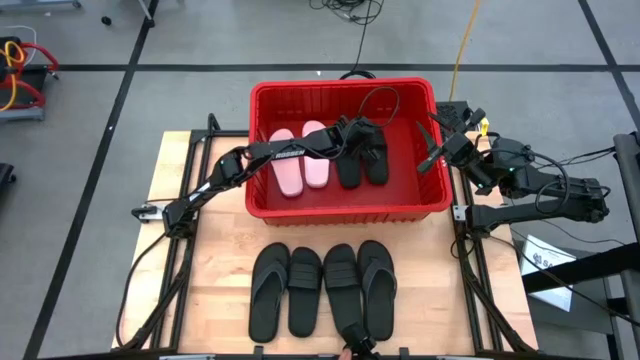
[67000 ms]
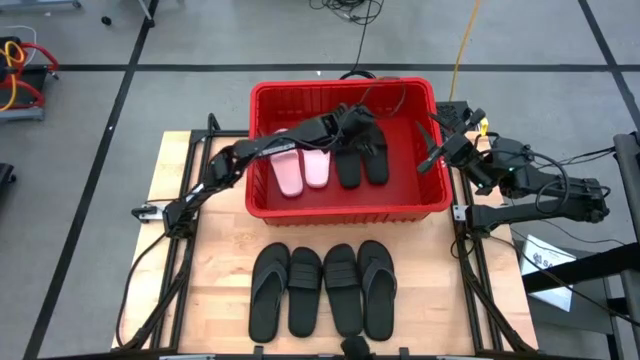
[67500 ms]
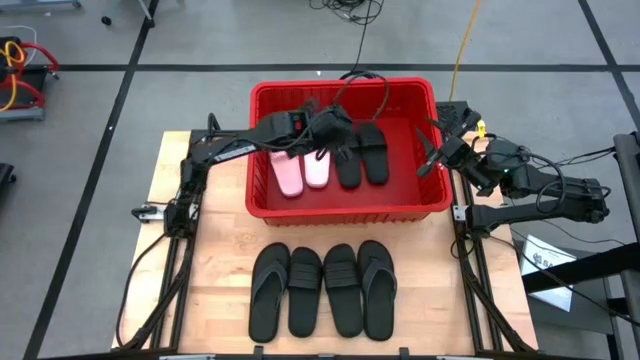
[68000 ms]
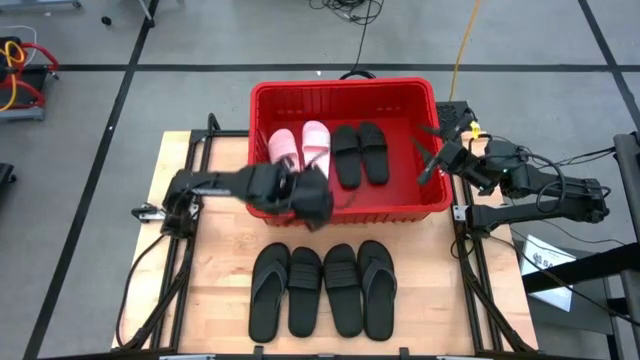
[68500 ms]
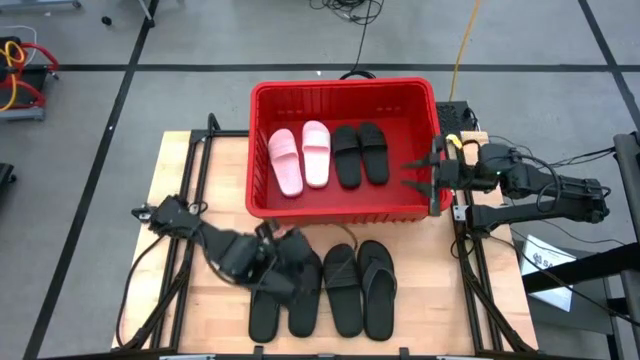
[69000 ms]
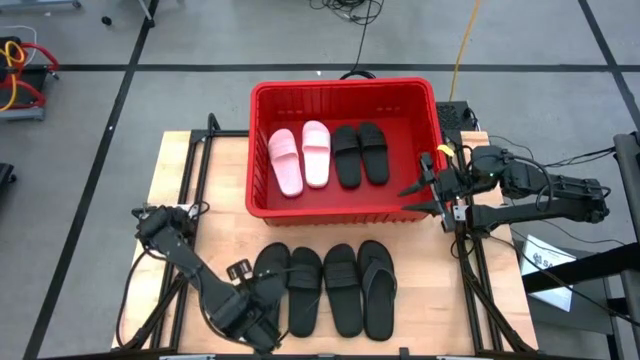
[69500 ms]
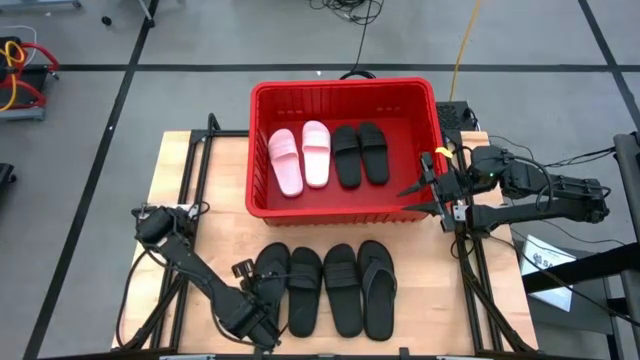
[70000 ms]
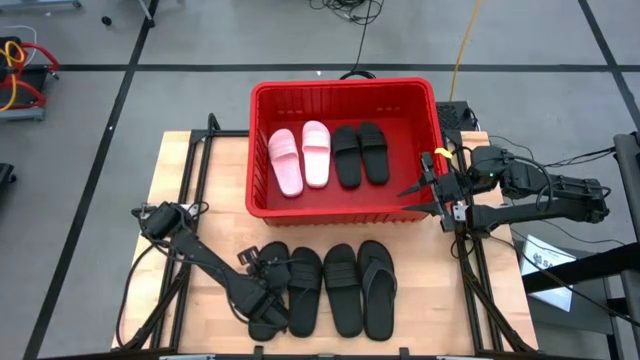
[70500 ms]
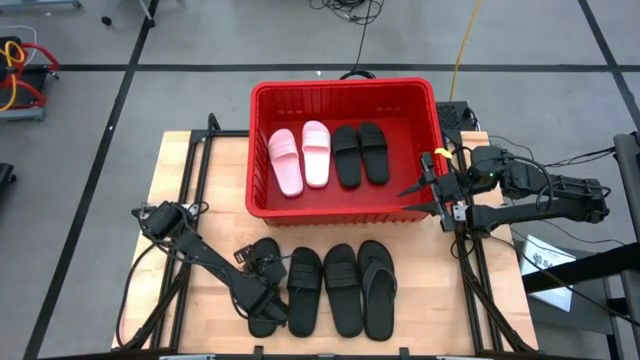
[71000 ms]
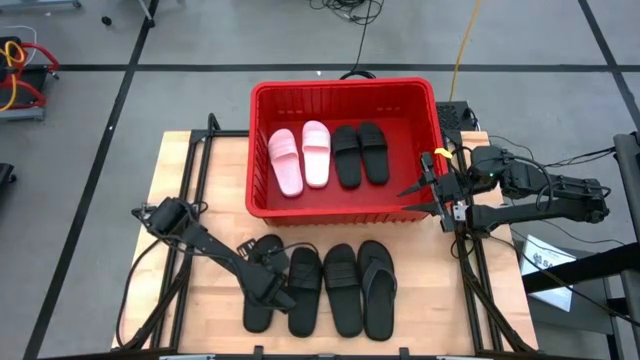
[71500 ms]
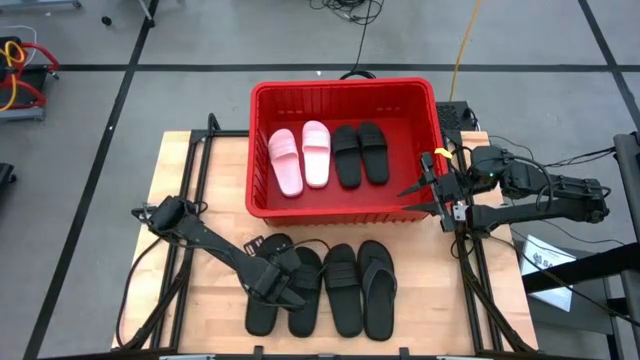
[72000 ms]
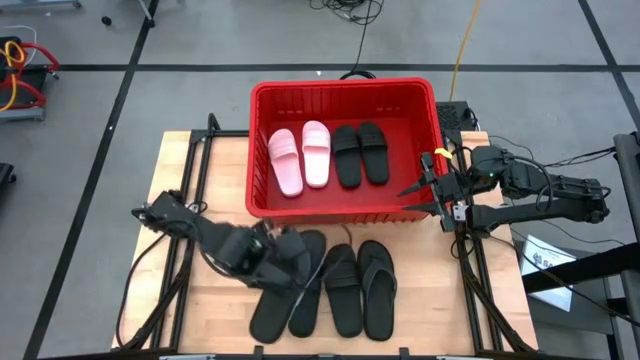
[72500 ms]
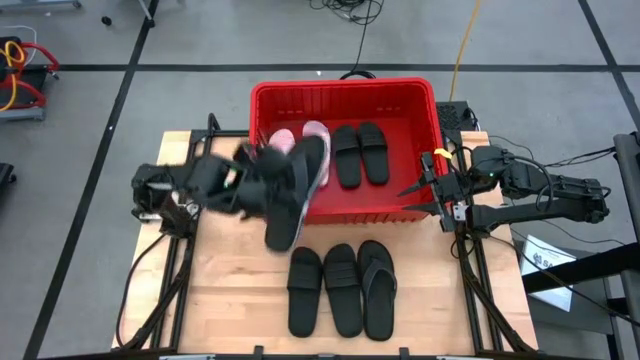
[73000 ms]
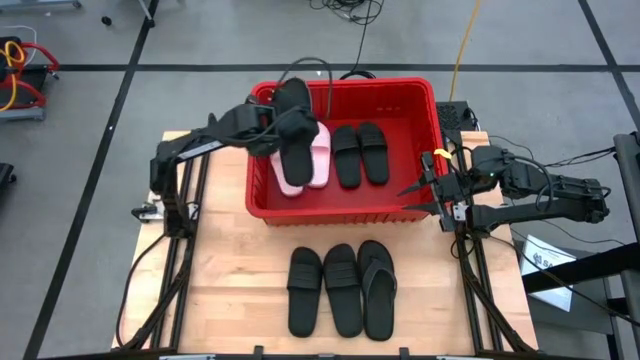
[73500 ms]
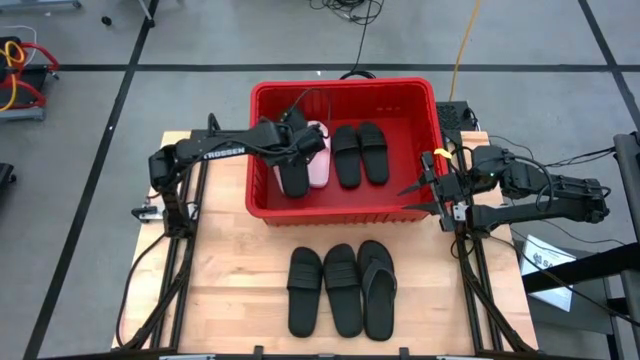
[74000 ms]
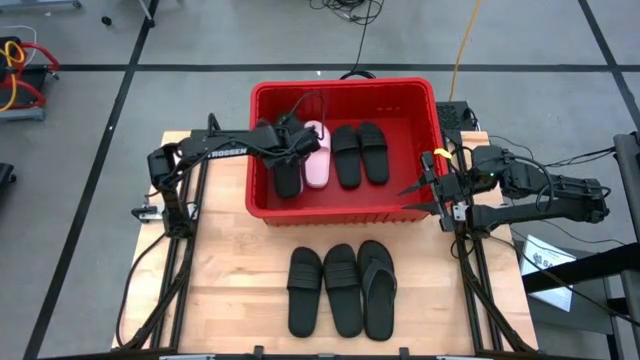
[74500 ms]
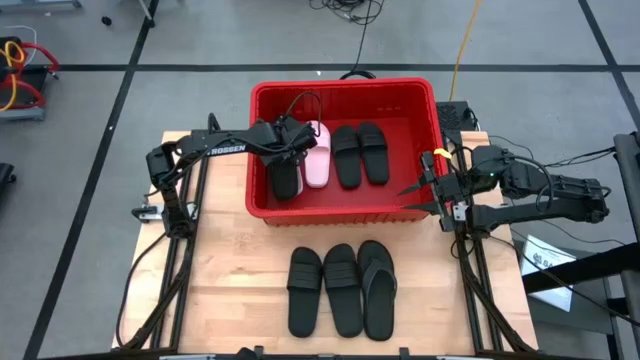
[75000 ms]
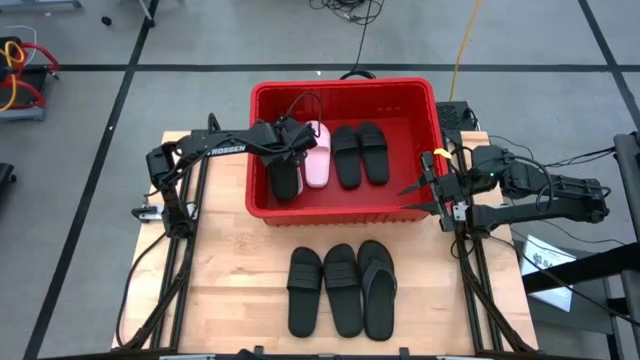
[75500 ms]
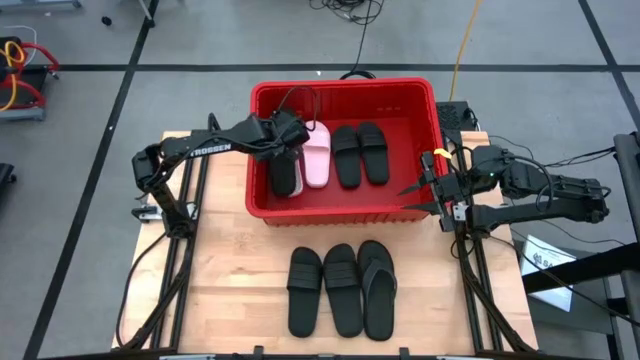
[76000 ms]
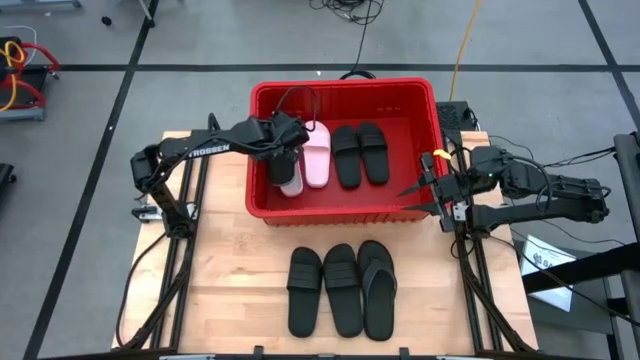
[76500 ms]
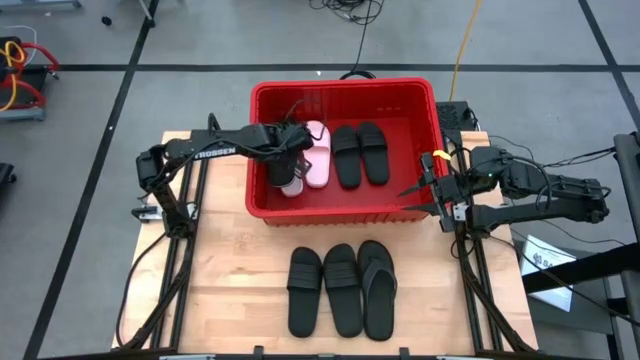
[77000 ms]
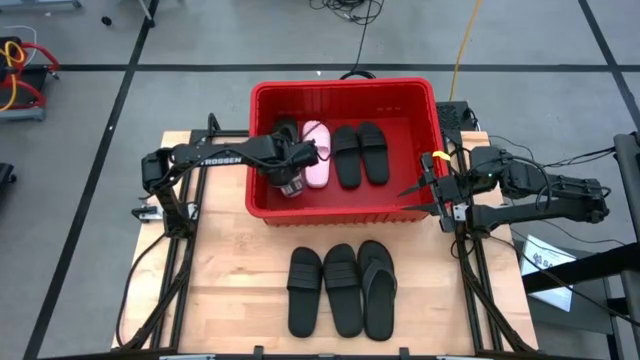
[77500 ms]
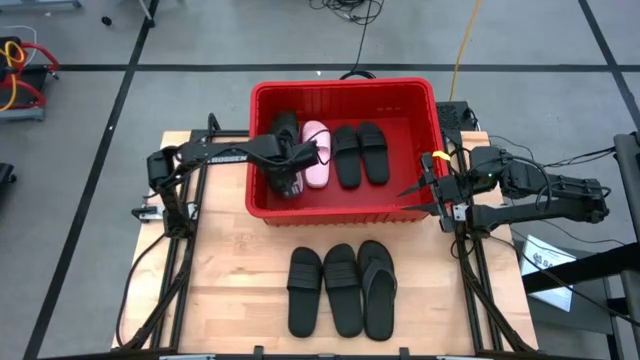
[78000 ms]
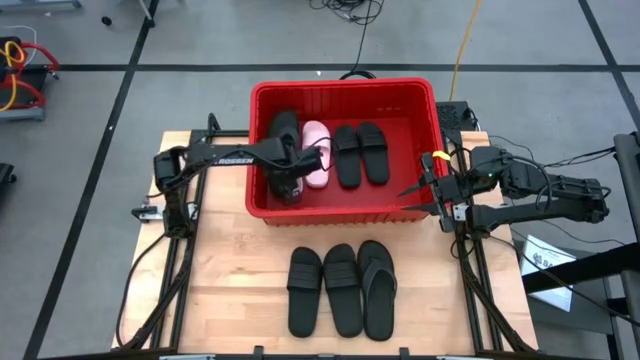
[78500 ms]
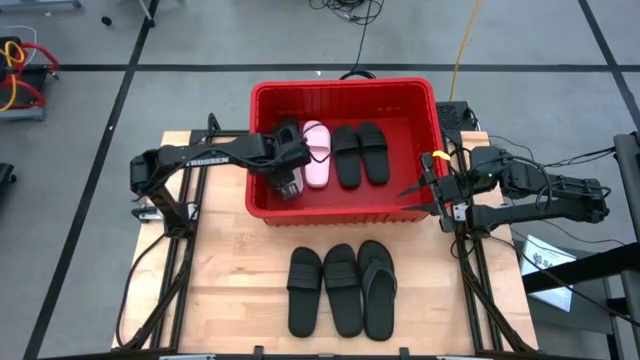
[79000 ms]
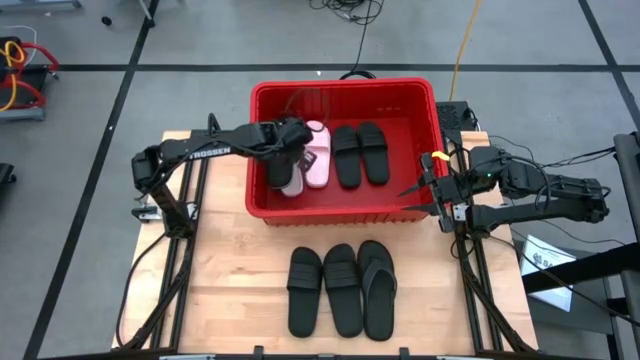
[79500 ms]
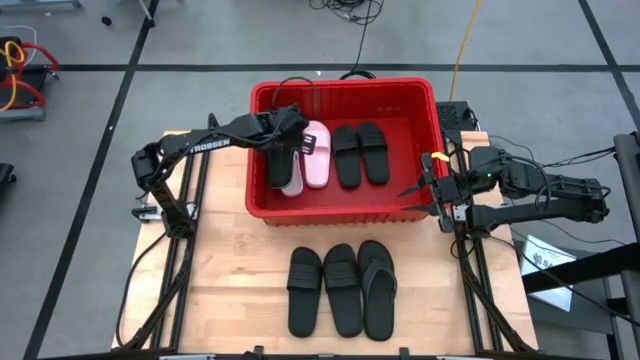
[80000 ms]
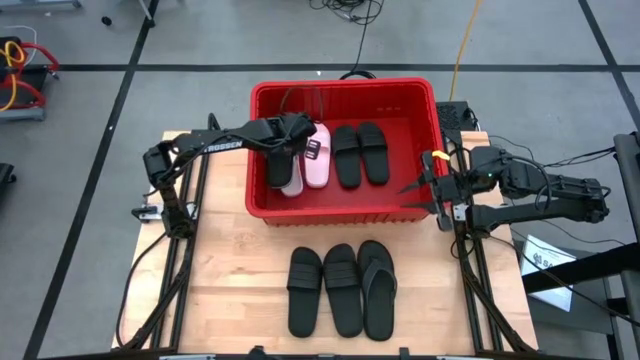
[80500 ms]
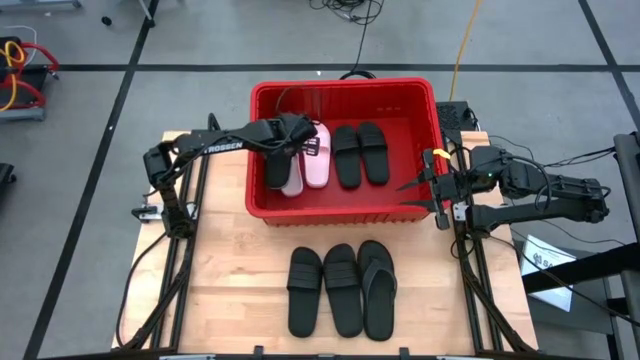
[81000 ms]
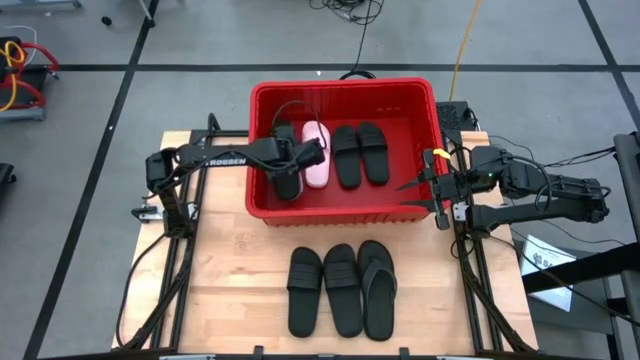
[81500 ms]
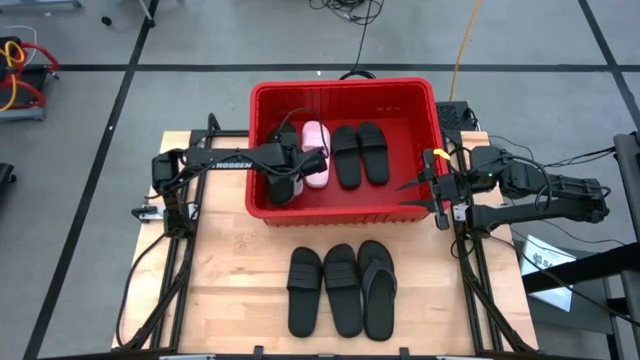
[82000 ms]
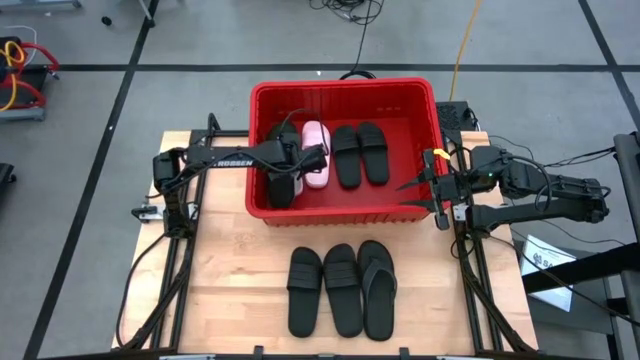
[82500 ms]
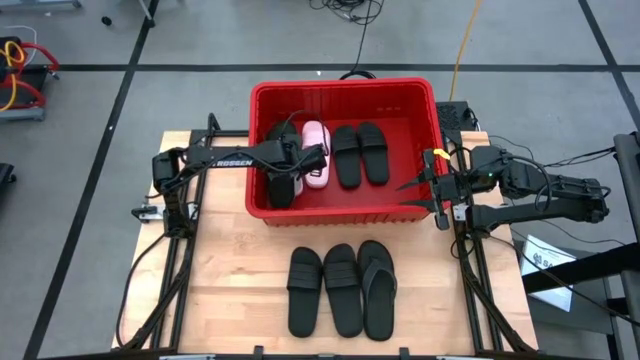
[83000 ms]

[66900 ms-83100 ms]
Task: Pick and place slides into bin
Put the black slipper into the red bin

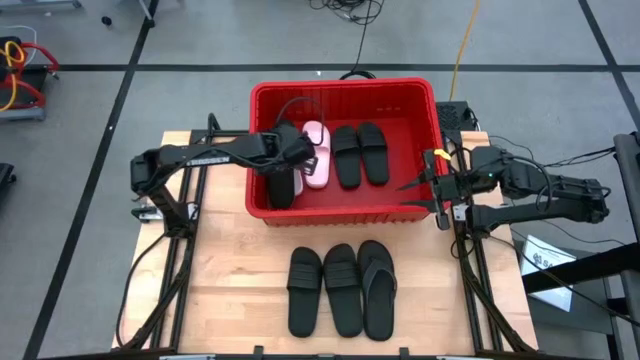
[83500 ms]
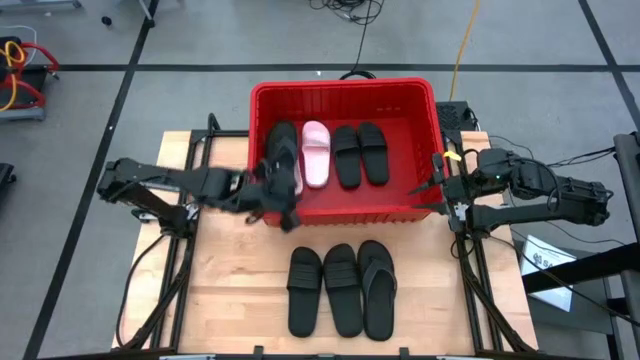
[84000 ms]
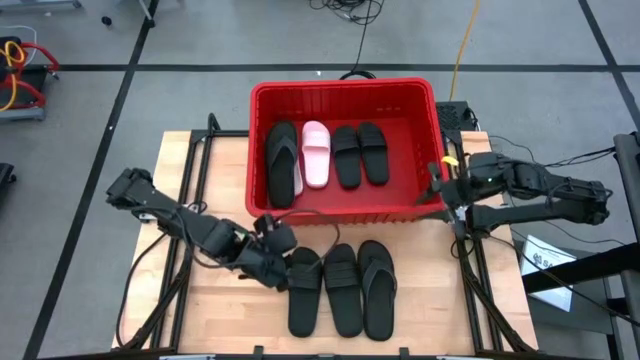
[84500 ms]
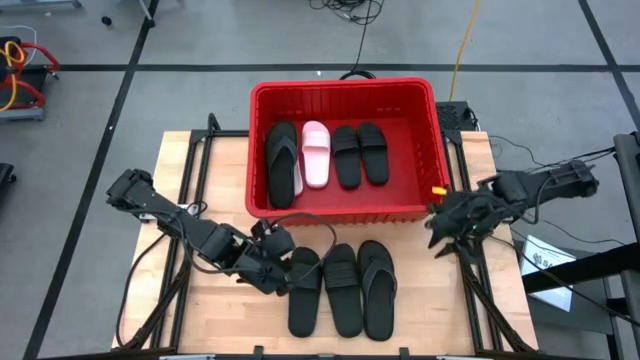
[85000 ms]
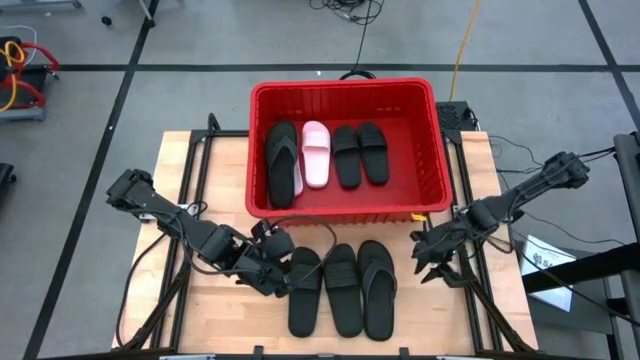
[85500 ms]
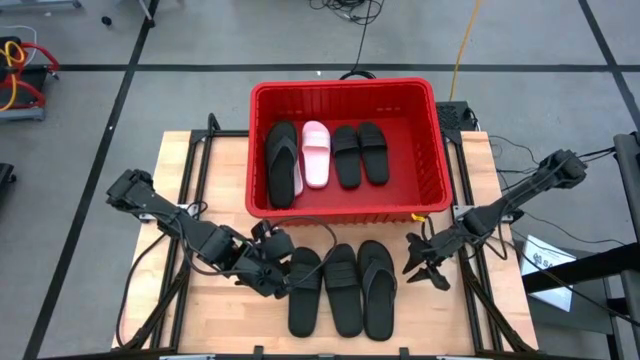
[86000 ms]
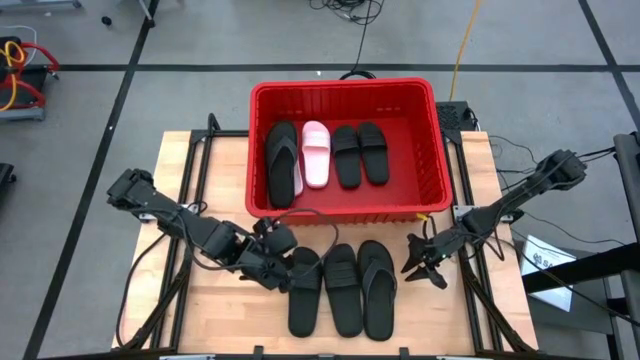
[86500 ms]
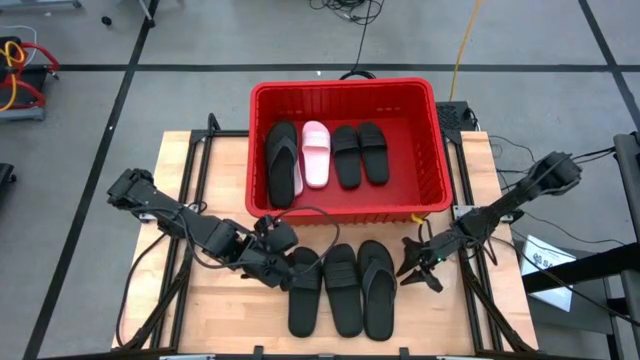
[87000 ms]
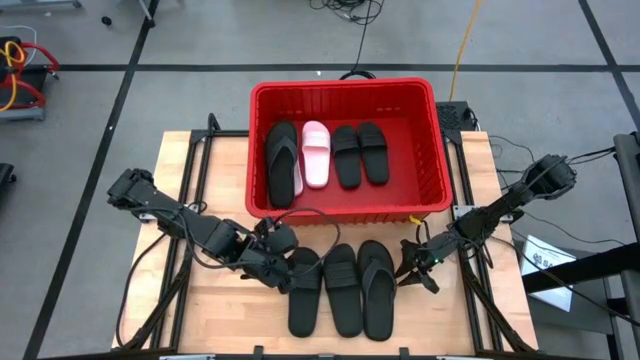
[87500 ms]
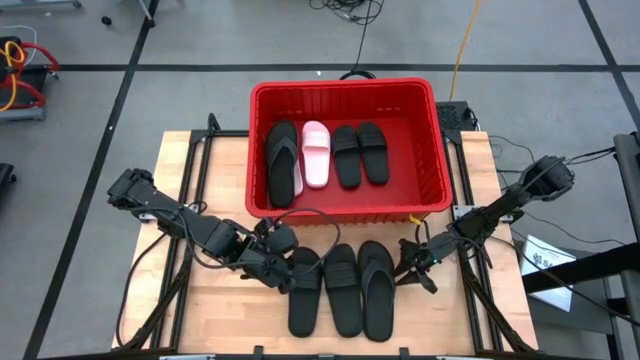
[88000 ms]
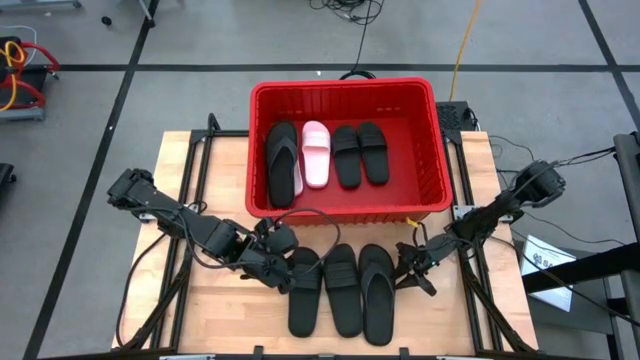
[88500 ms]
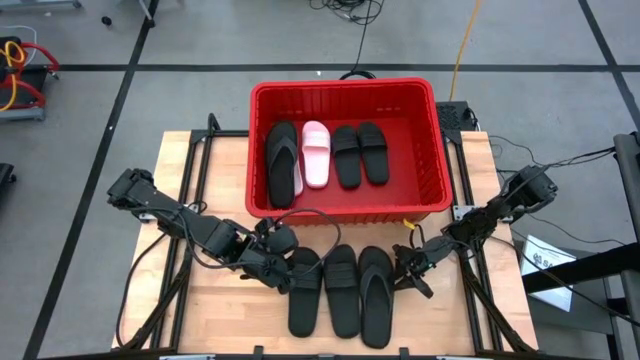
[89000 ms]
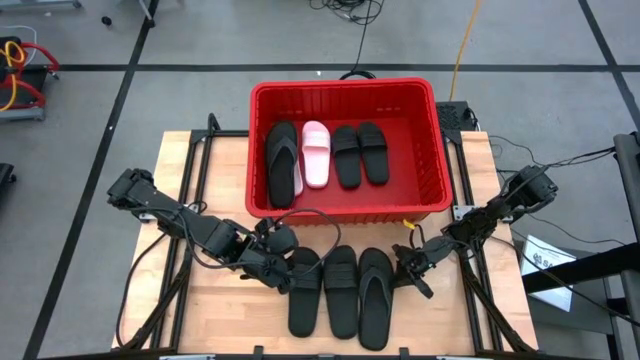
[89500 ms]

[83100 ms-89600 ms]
Put the black slipper into the red bin
